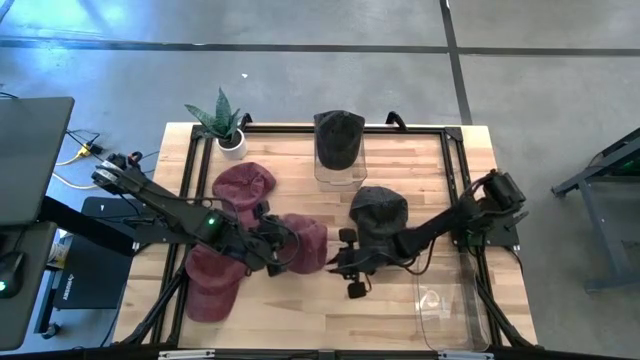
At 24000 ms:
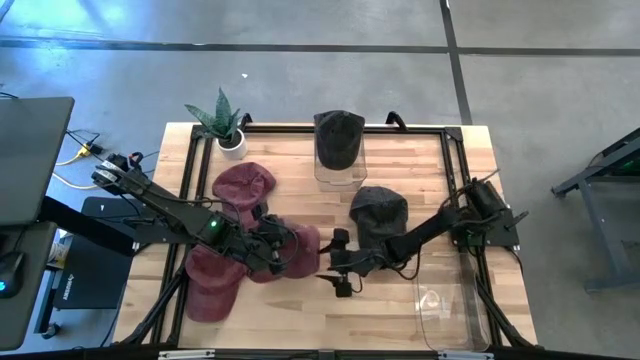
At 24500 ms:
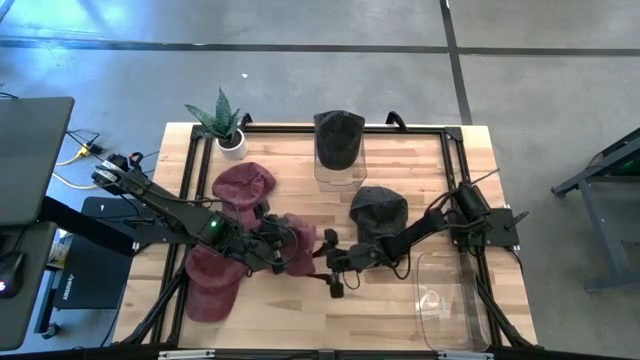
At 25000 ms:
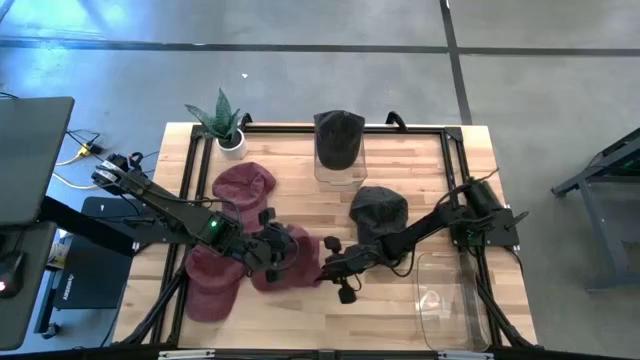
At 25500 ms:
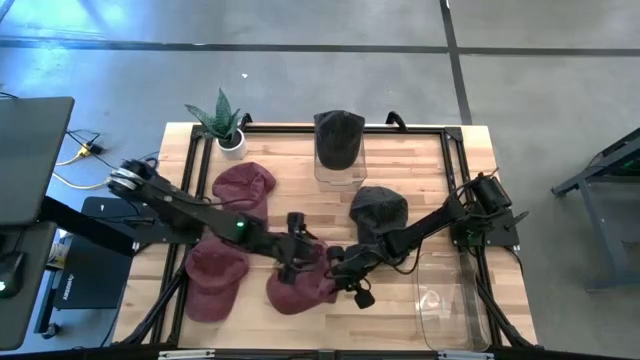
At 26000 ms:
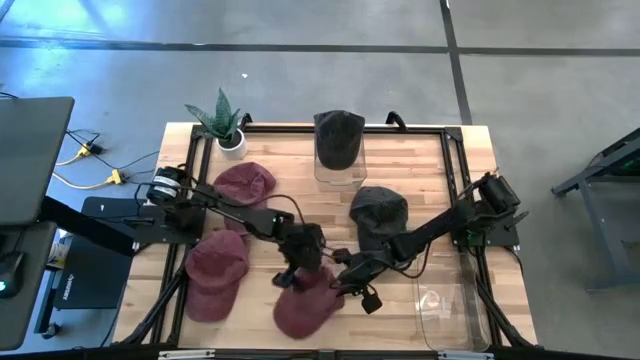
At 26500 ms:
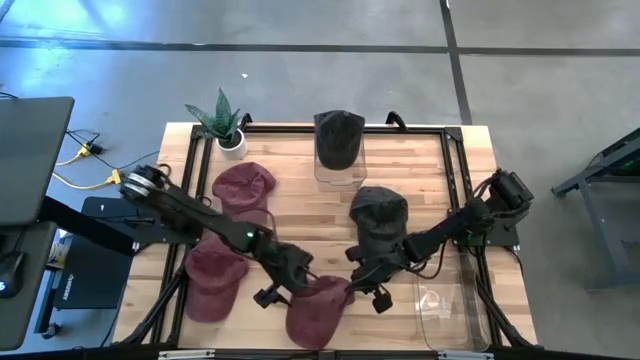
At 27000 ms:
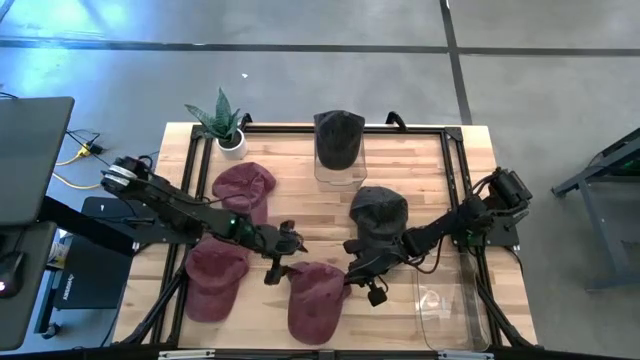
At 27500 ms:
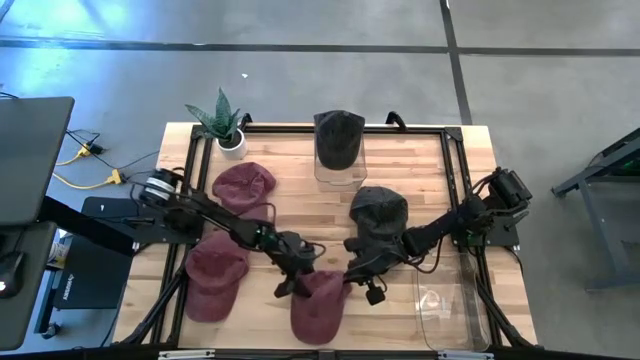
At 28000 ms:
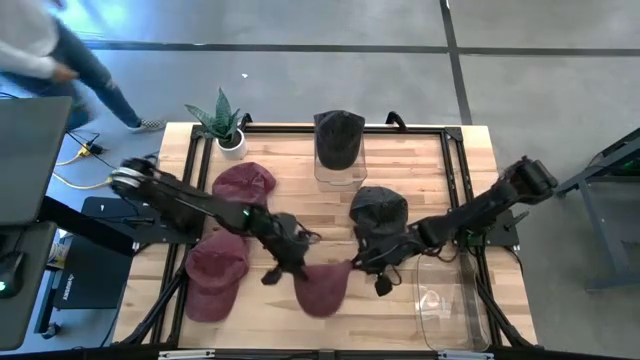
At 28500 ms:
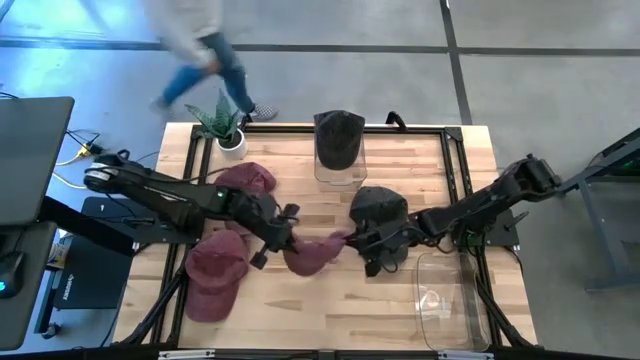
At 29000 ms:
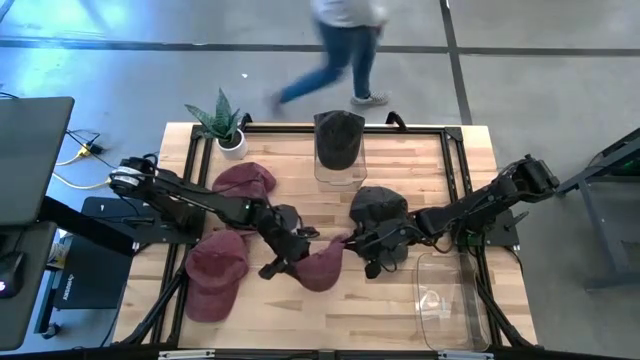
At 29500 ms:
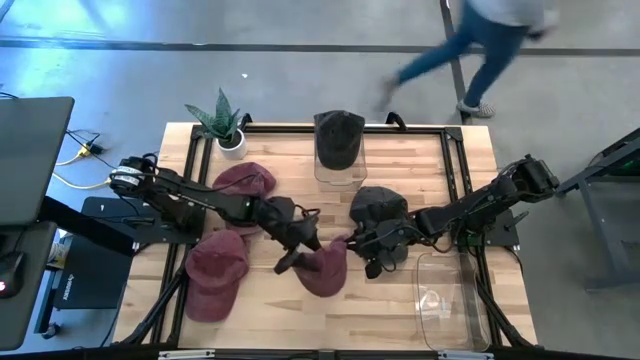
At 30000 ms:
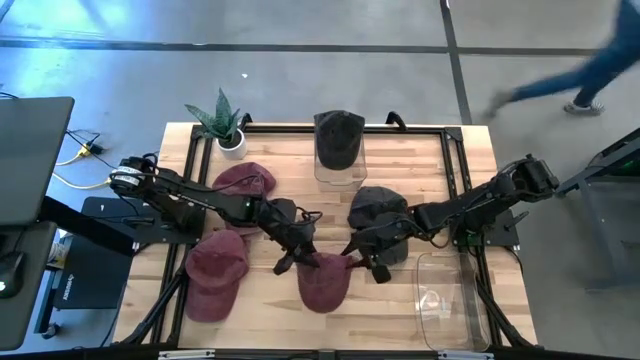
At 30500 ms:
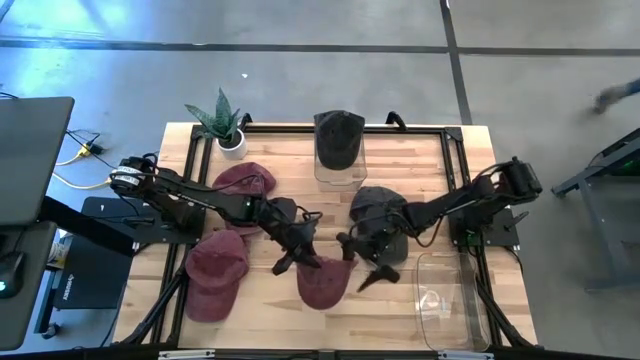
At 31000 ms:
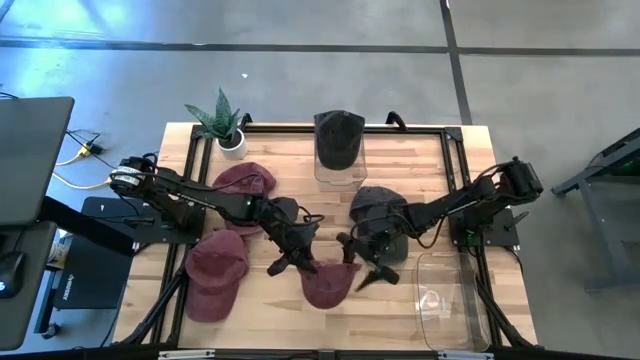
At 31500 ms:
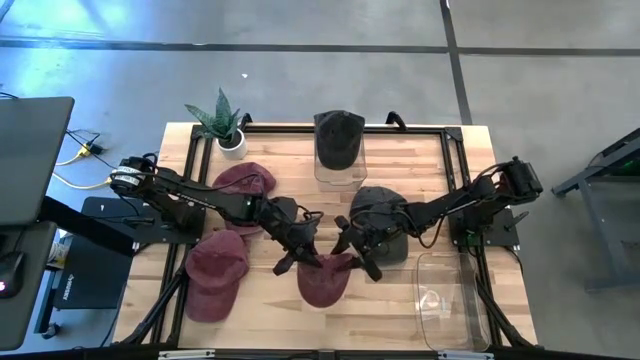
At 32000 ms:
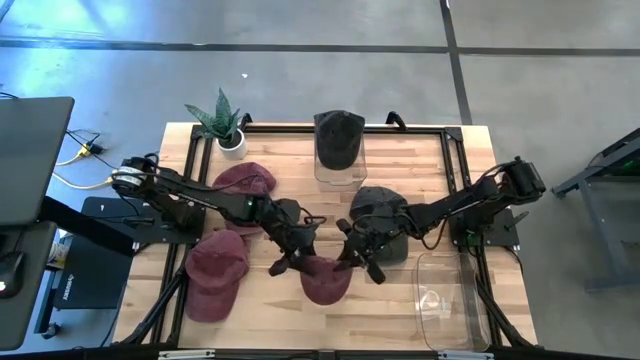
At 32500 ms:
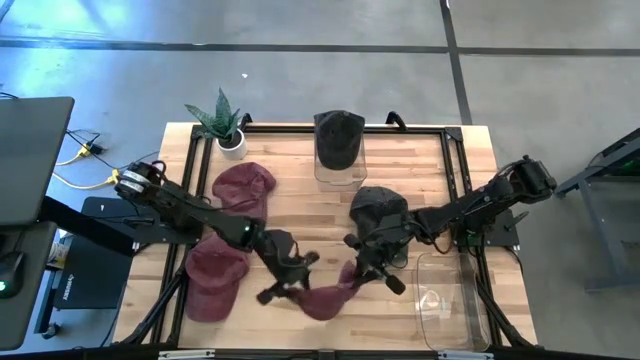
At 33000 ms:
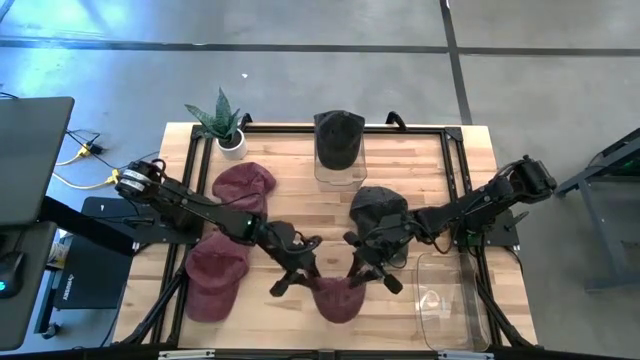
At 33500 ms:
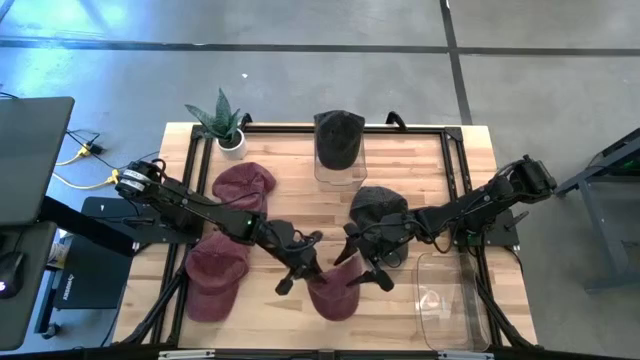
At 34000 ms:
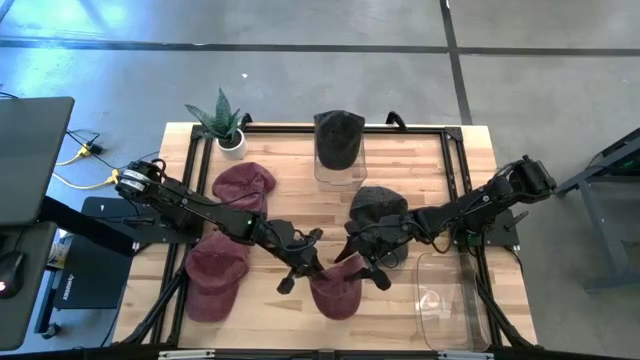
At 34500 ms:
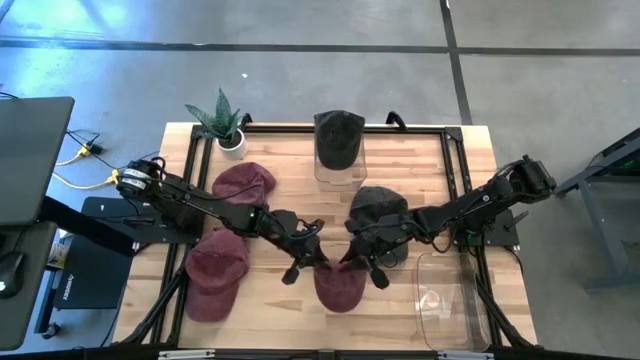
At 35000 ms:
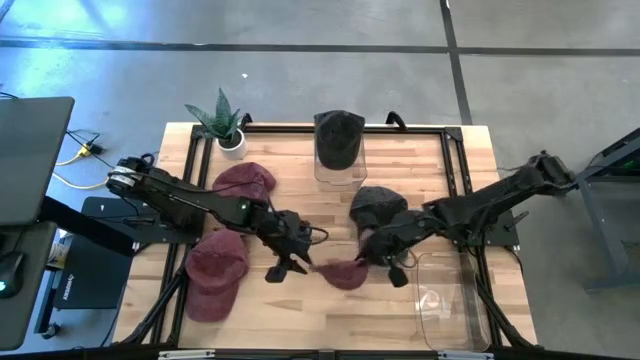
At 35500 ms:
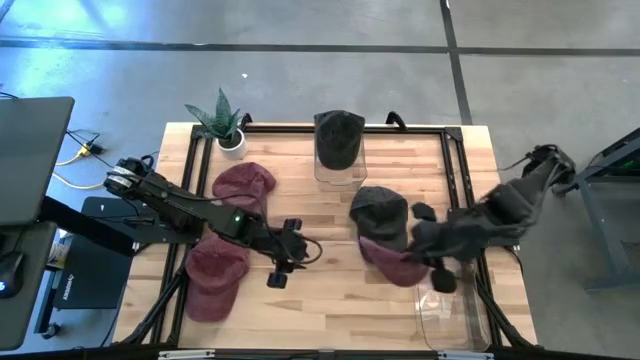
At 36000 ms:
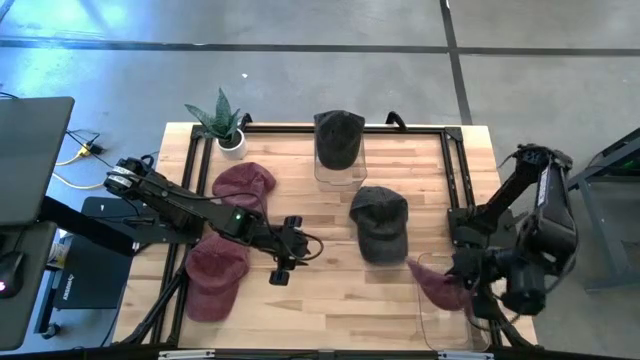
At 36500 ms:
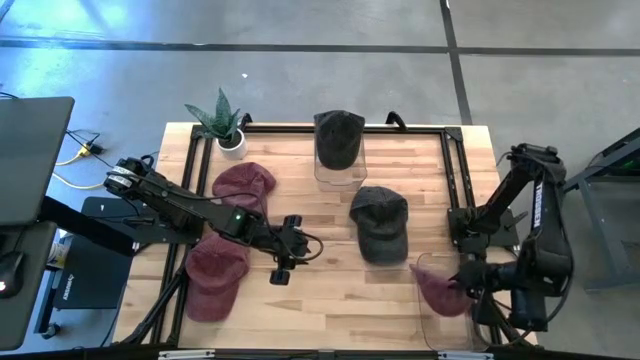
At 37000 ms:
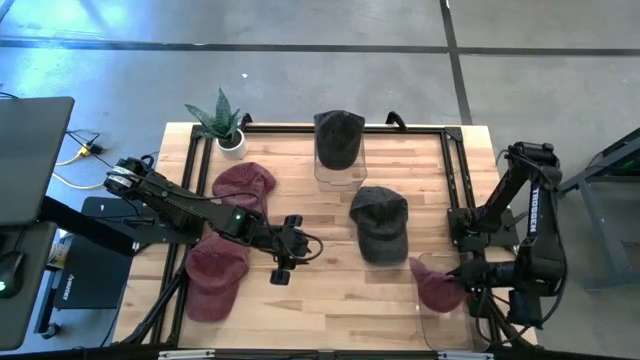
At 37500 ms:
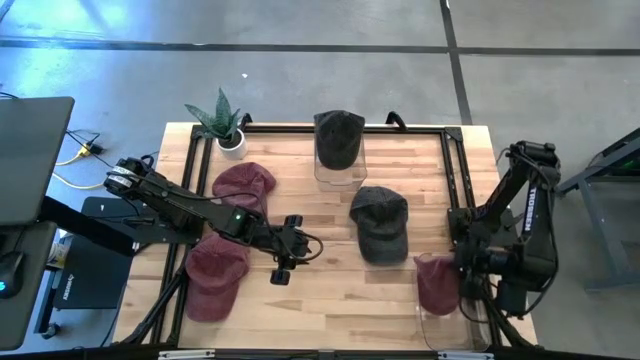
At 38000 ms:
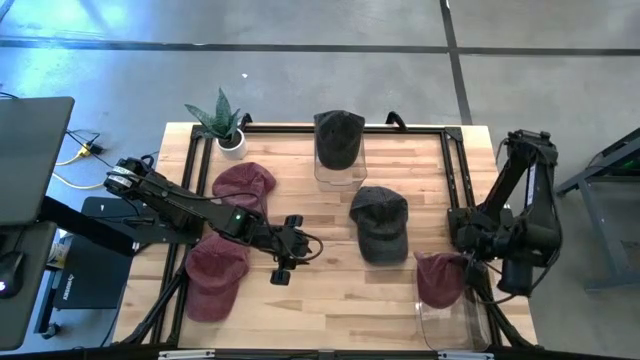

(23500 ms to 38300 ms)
Task: Pick & Place hat
Put the top right red cap into the bottom transparent bin

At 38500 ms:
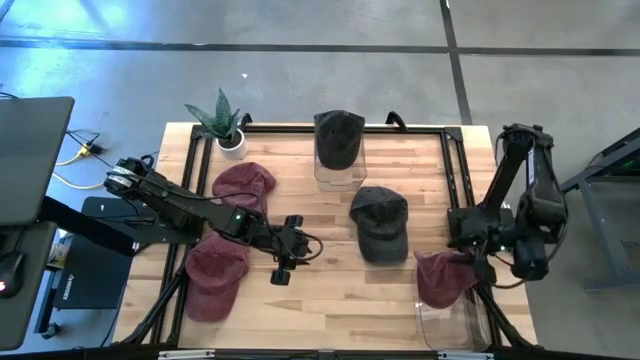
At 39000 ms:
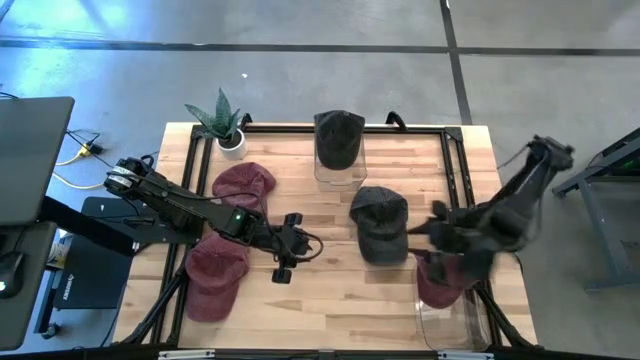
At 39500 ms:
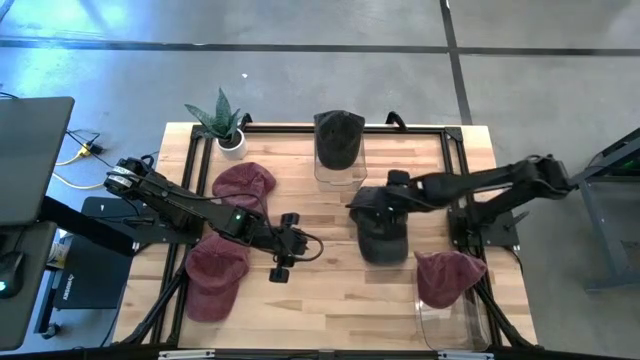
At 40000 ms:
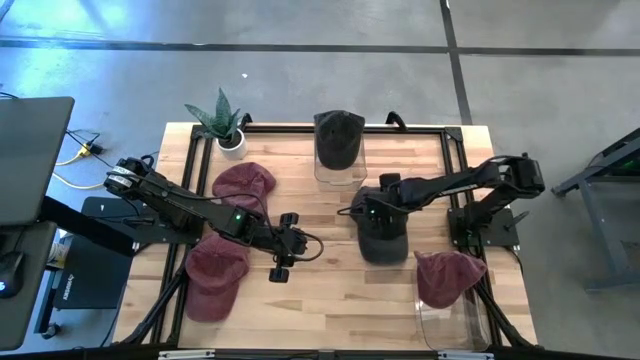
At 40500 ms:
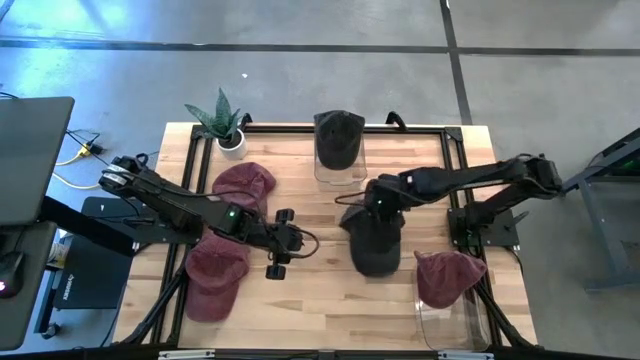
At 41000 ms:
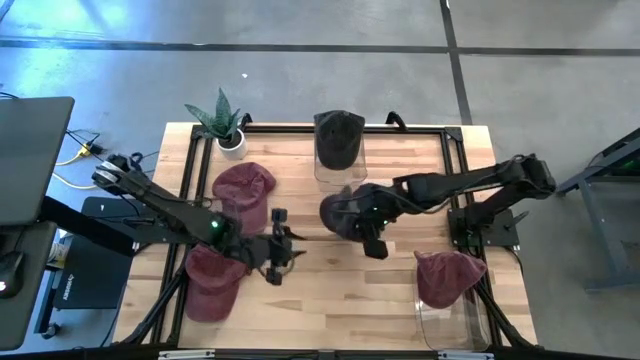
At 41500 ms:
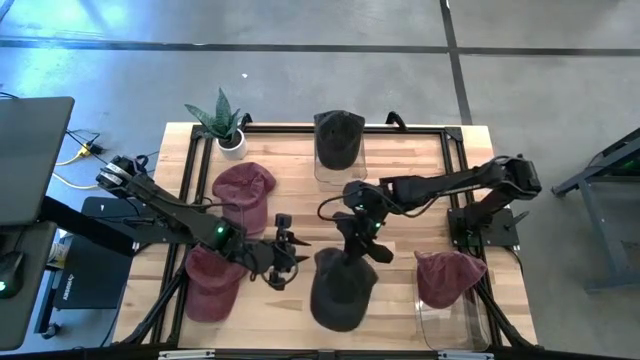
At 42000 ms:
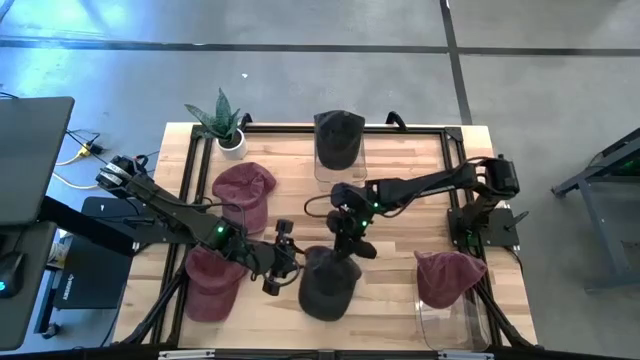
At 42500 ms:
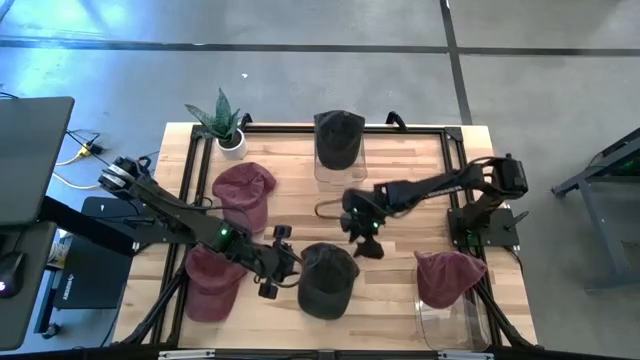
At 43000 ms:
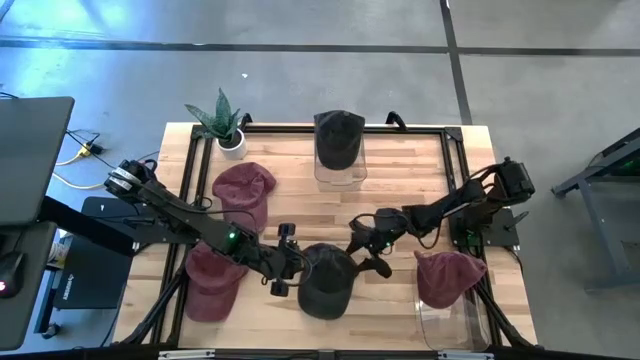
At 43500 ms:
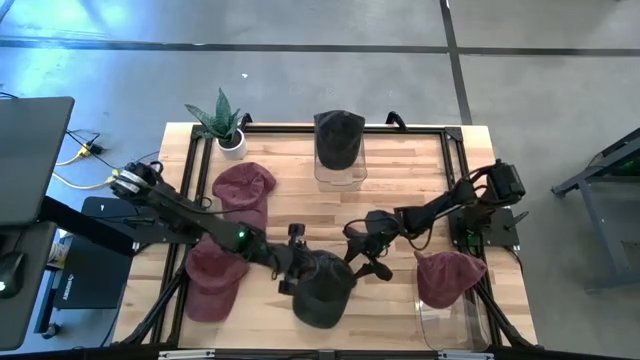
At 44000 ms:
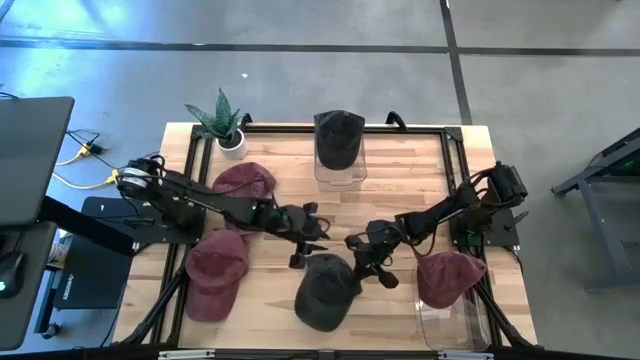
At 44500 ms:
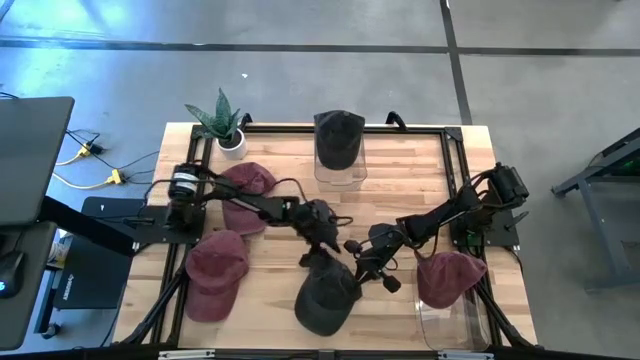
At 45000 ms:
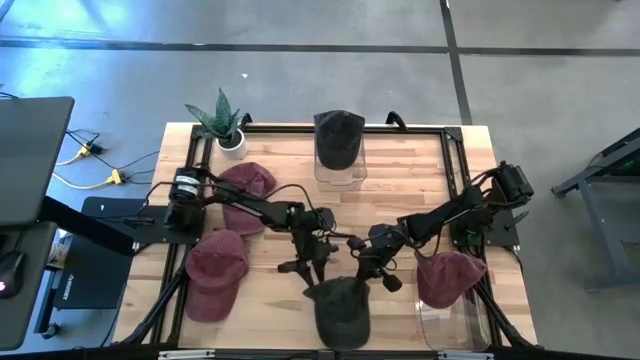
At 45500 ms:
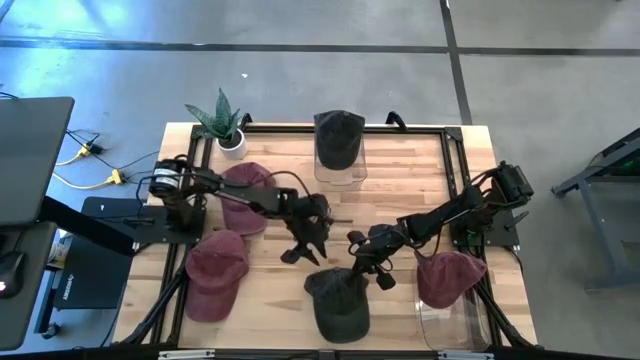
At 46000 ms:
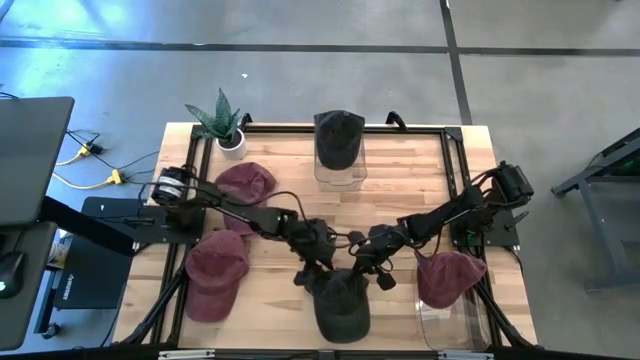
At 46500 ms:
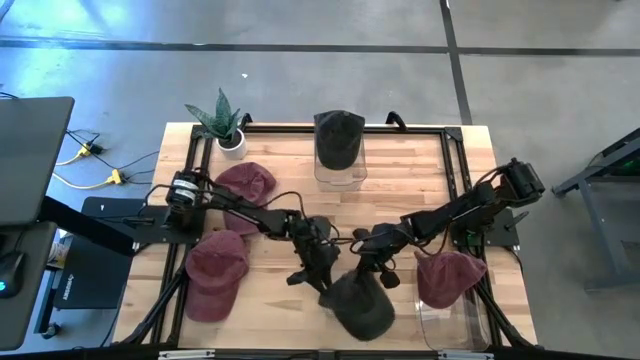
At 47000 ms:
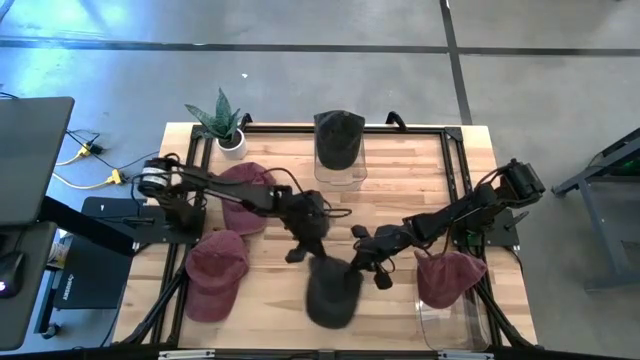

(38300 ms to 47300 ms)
Put the black cap into the top transparent bin
